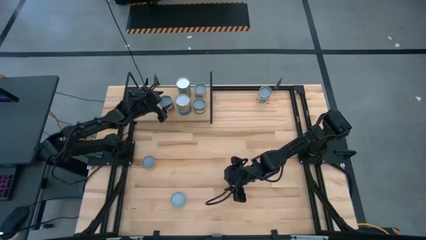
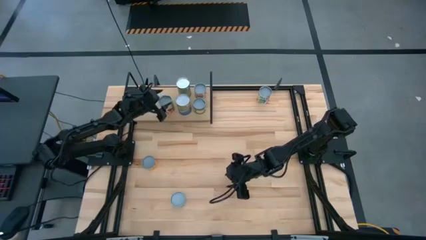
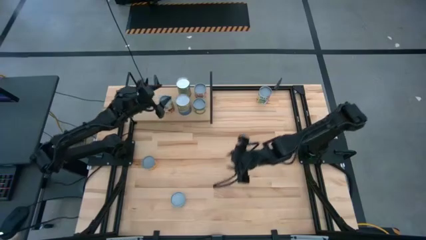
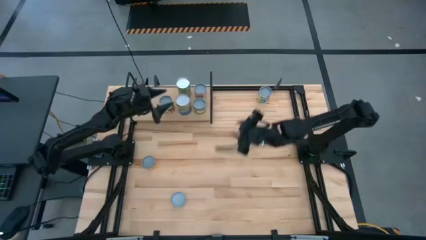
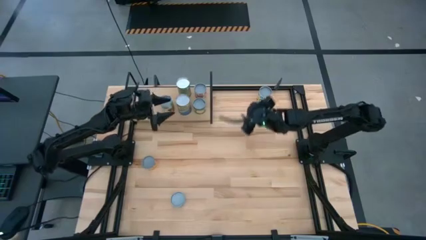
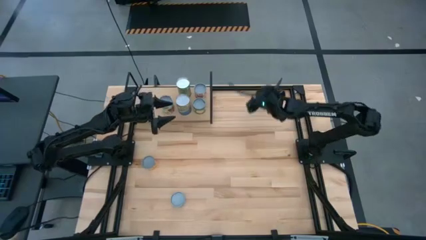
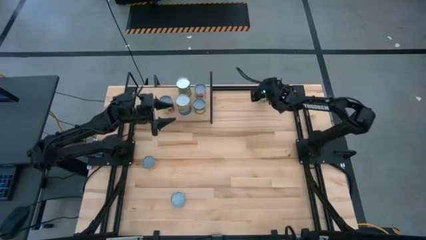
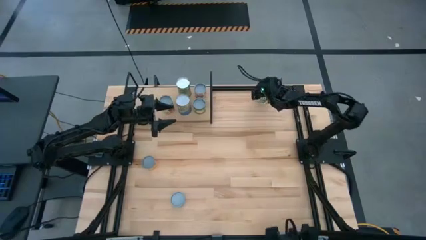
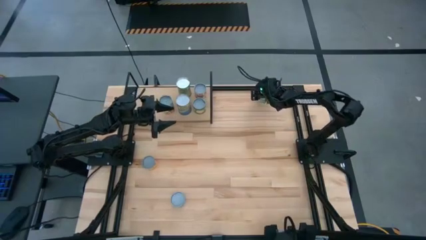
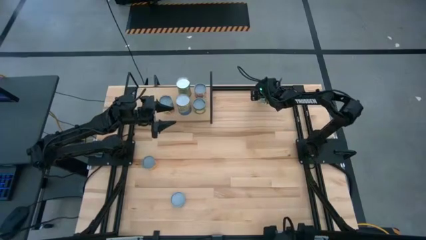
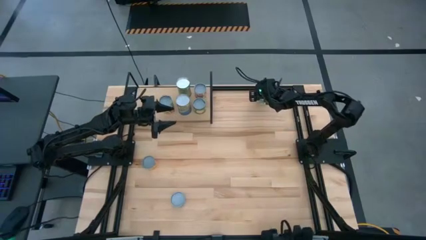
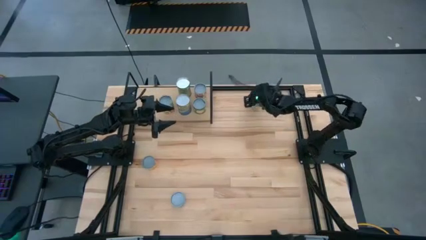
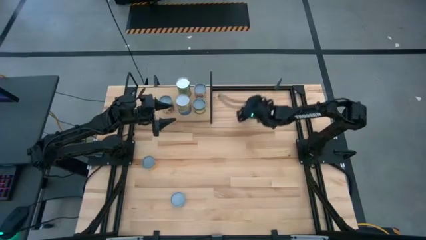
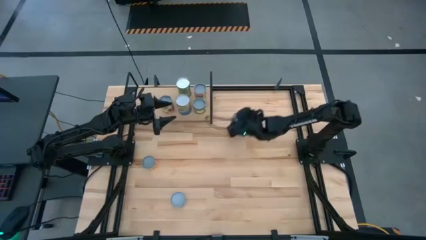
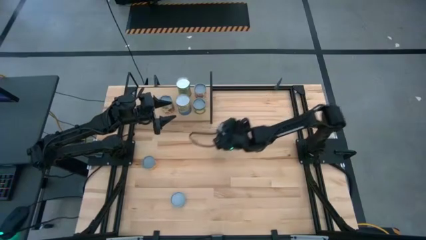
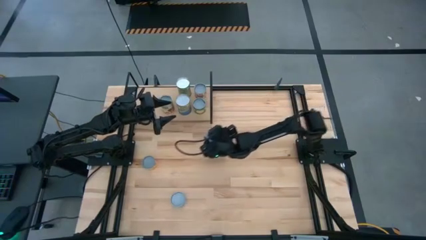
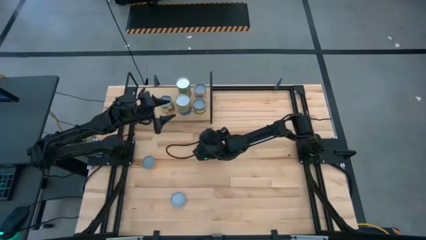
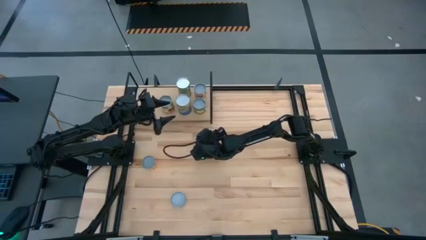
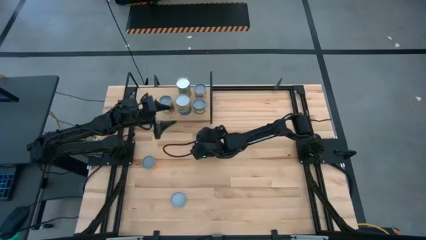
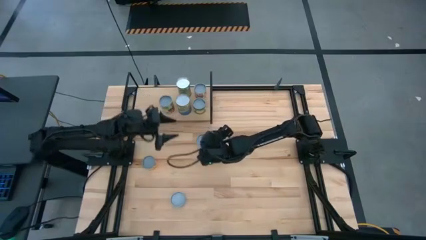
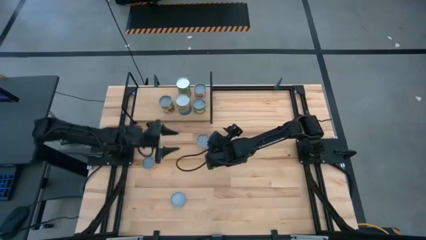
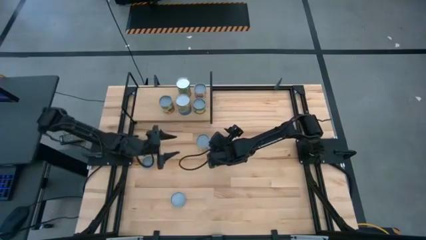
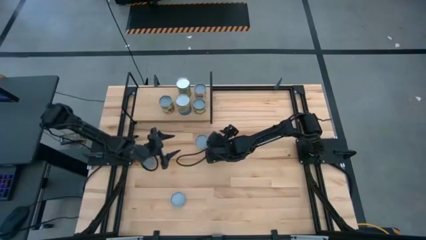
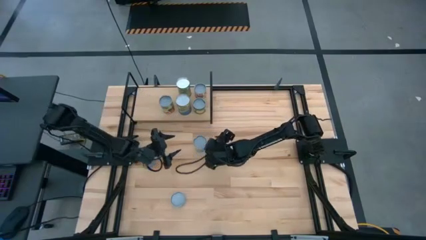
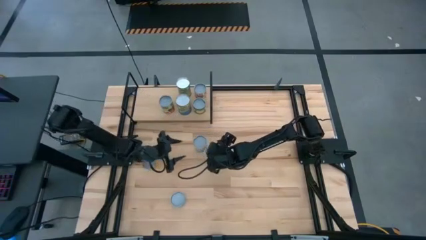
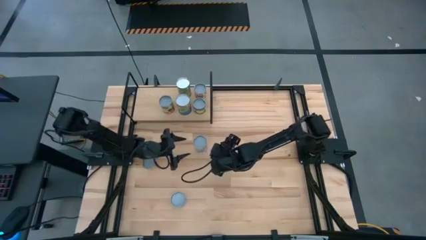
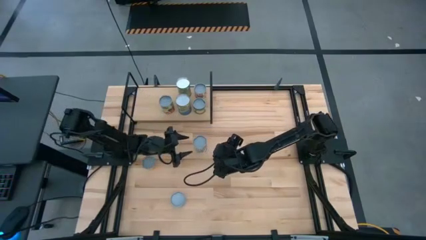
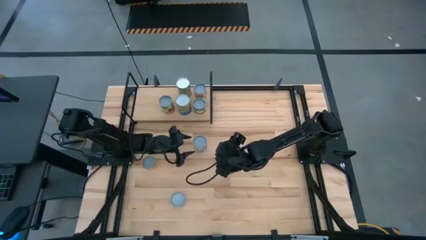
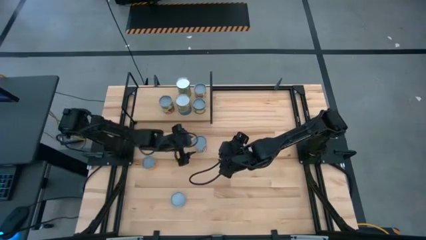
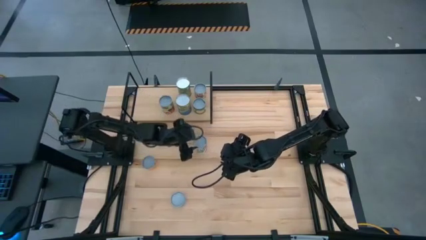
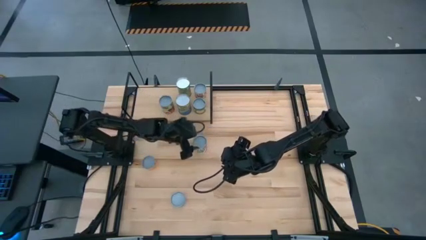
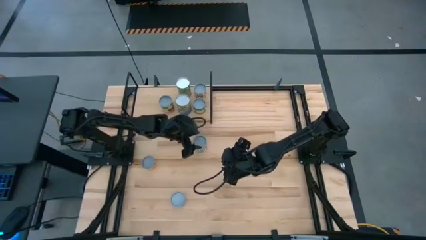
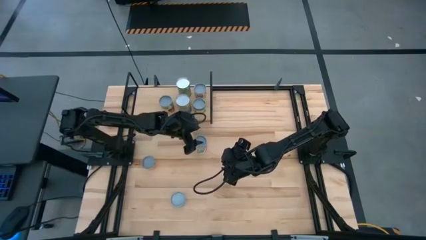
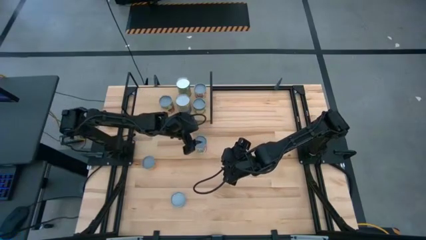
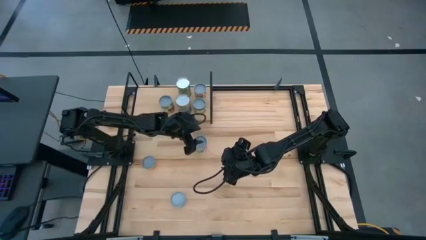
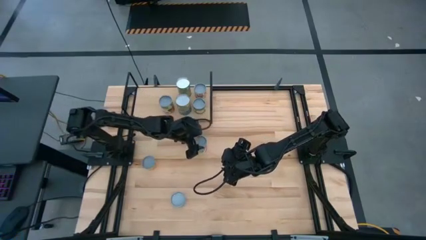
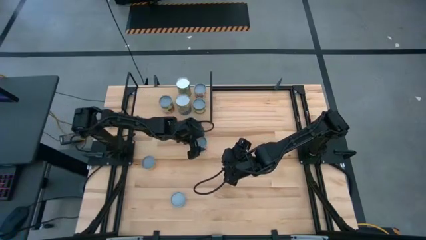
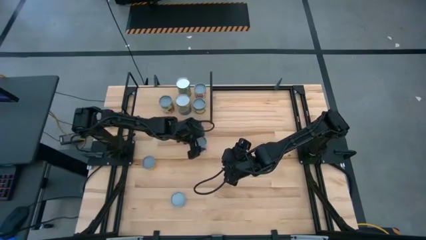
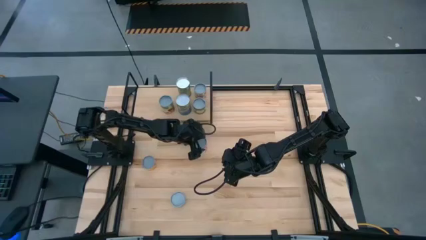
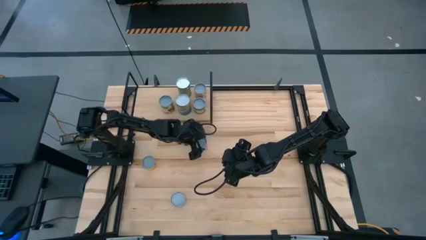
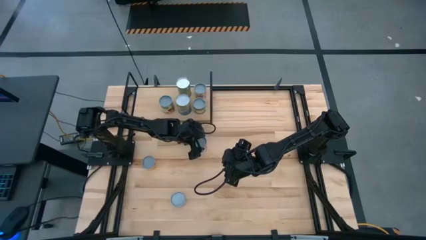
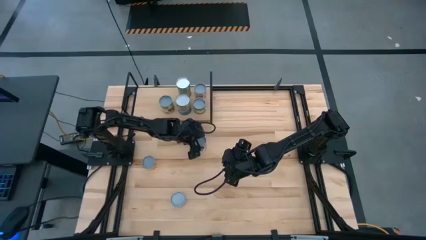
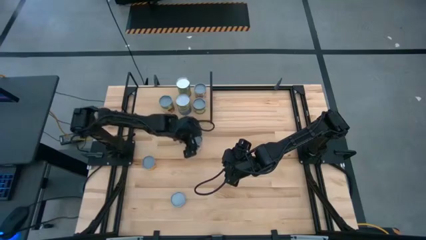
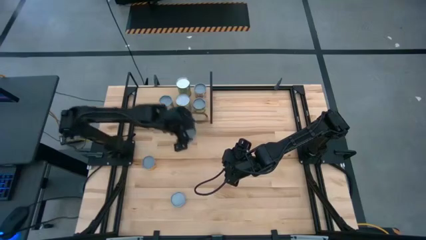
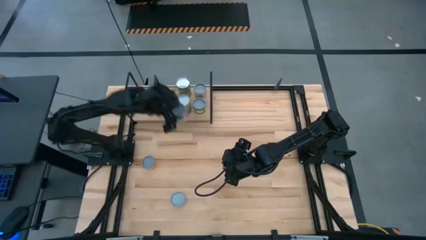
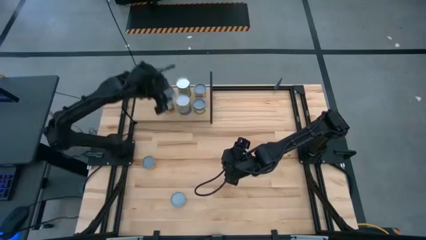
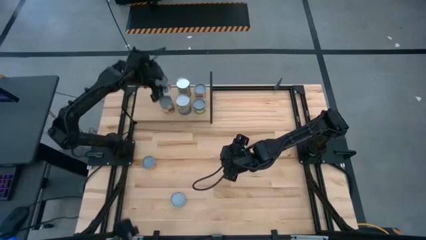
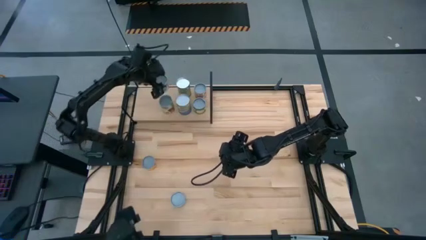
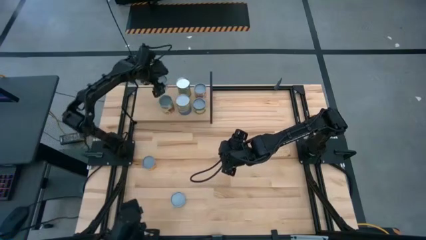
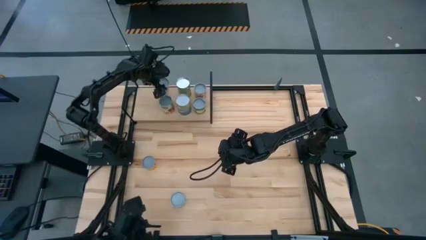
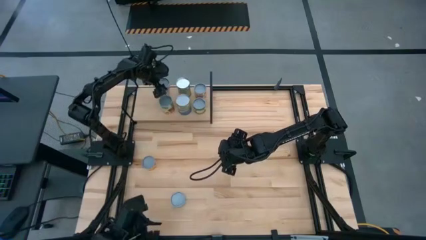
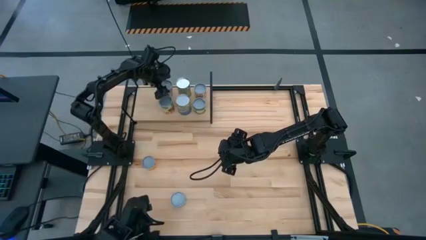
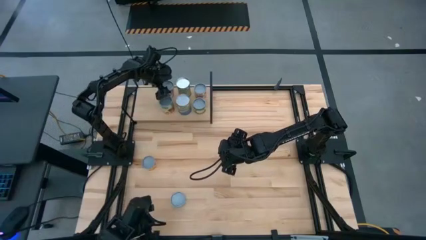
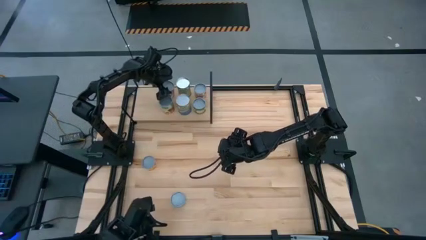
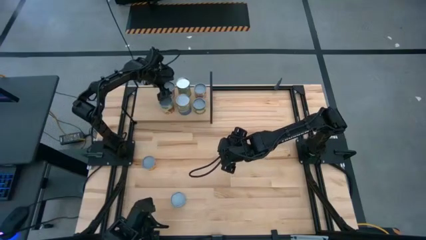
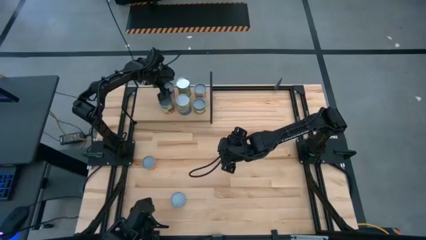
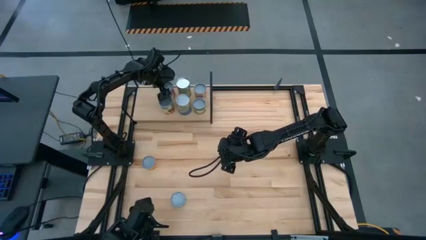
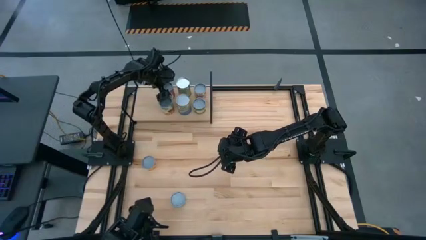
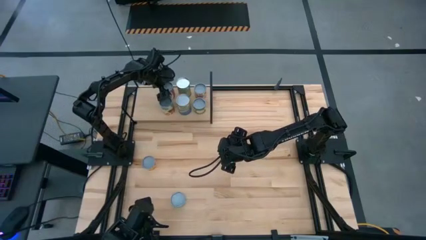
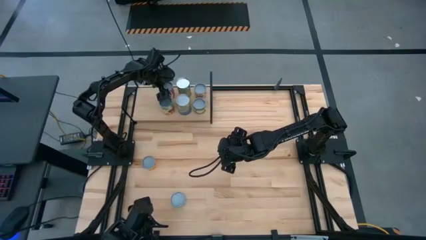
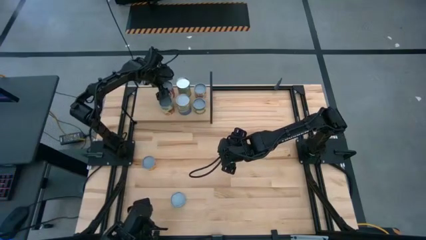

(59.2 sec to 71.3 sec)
Task: Pick and place cans onto a shelf
Put the canned mixed fruits on the shelf

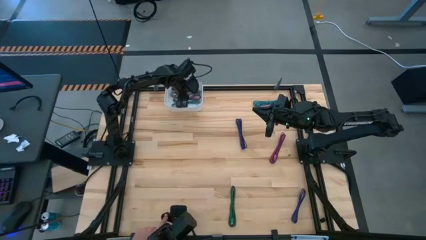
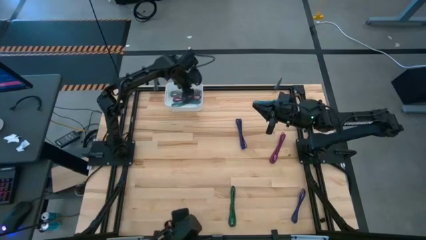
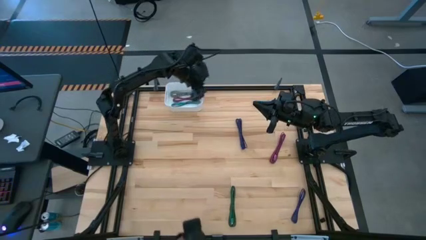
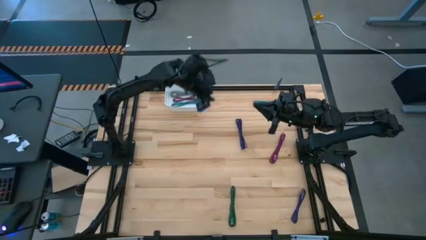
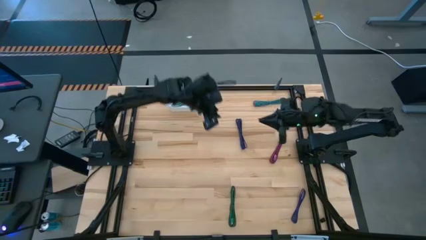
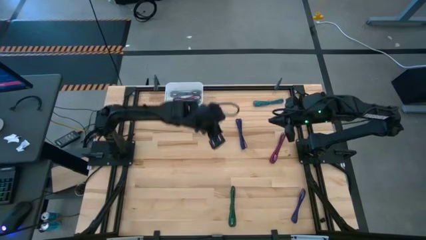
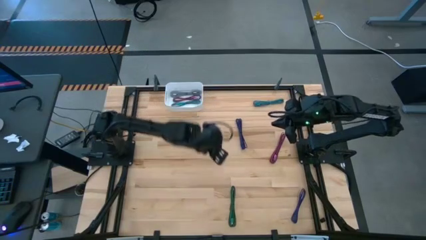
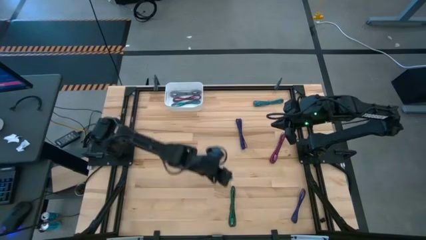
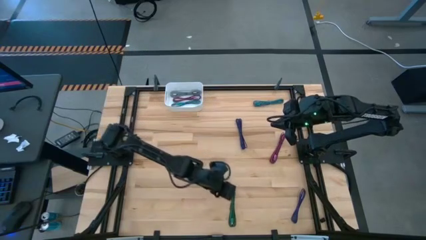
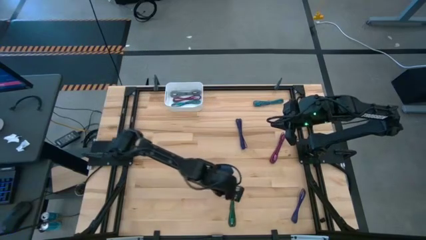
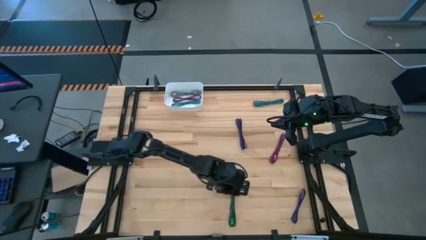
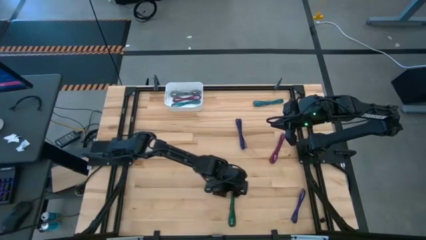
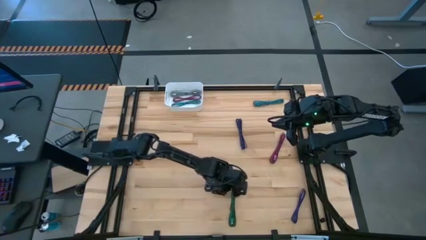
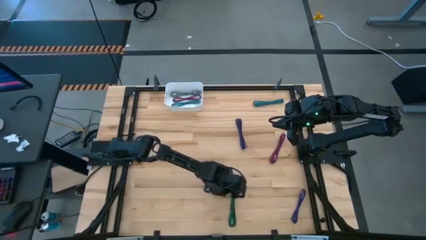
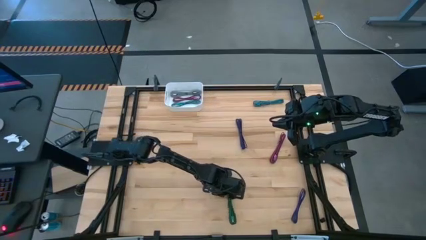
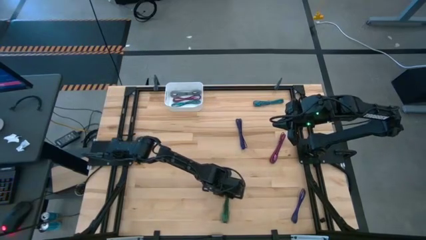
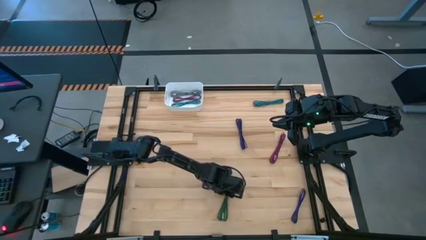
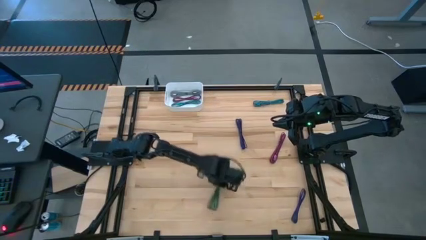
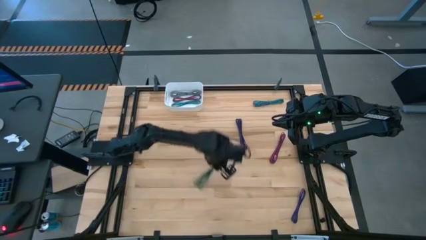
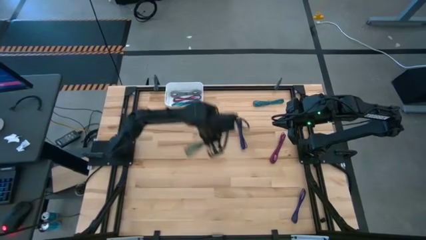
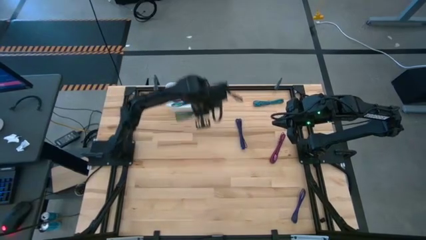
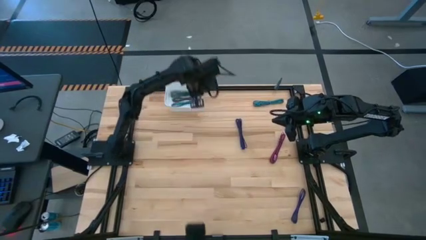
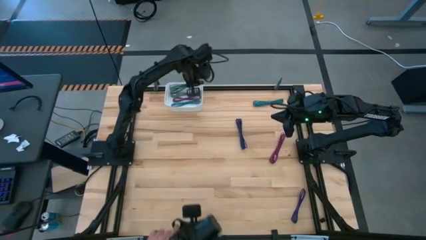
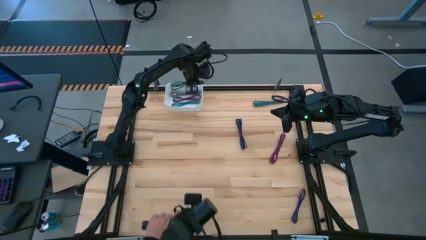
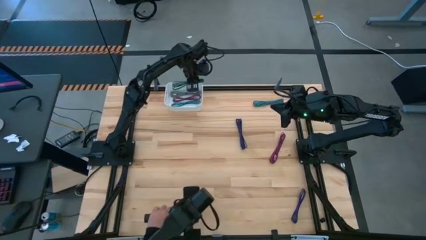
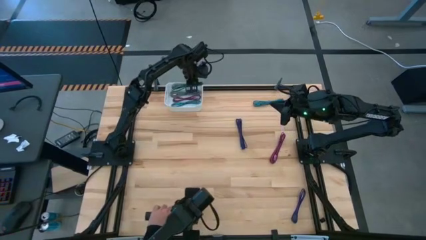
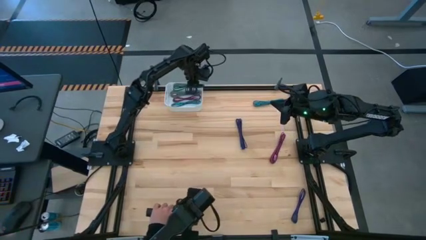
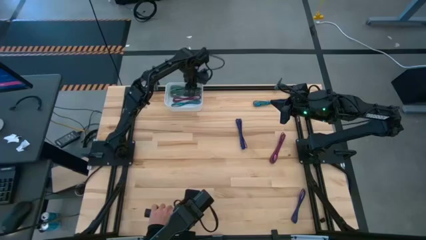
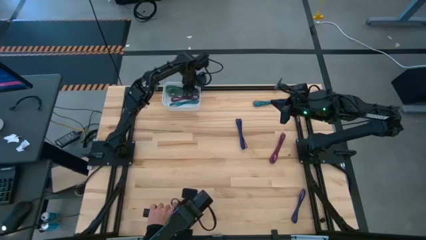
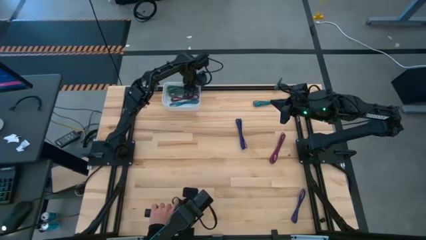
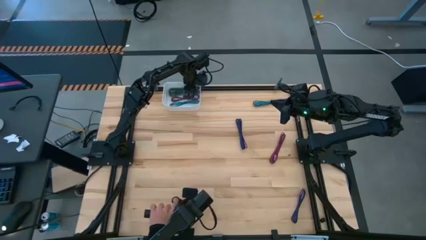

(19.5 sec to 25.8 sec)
Task: Pick and place USB-C Cables
Put the green charger cable into the white bin
